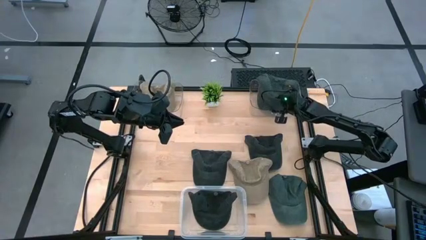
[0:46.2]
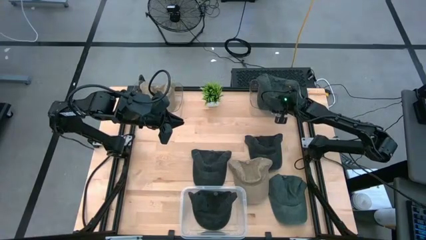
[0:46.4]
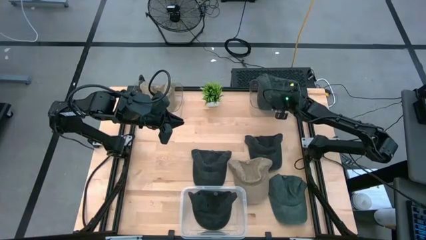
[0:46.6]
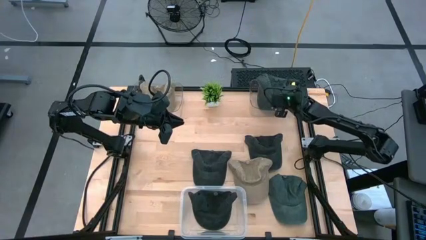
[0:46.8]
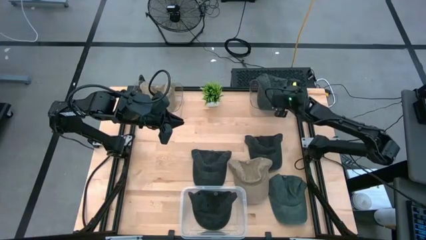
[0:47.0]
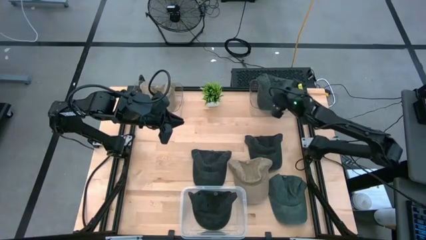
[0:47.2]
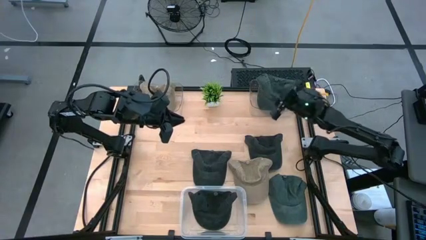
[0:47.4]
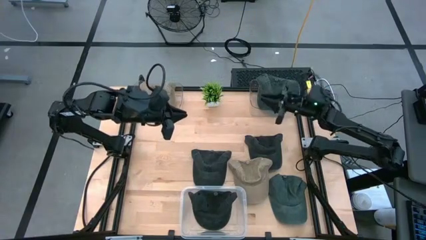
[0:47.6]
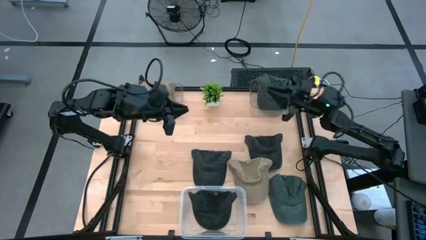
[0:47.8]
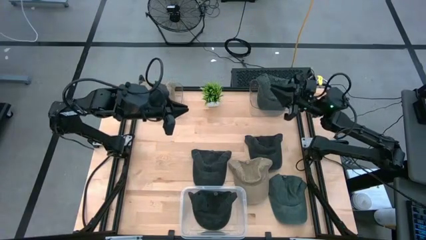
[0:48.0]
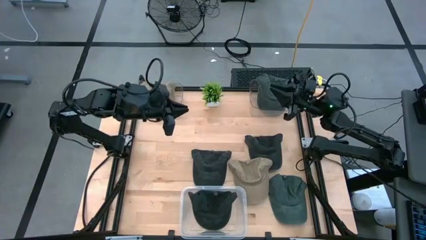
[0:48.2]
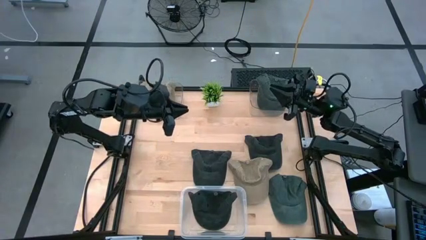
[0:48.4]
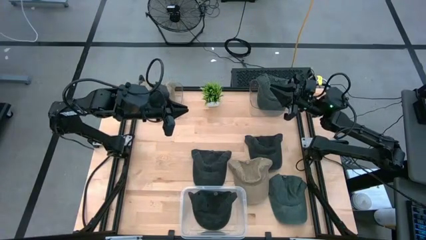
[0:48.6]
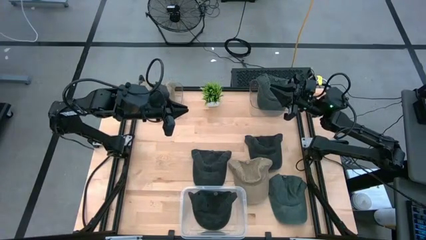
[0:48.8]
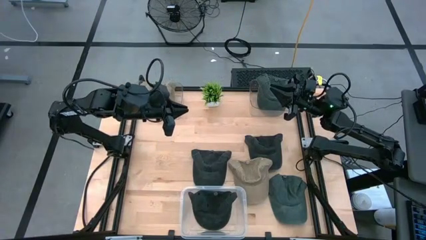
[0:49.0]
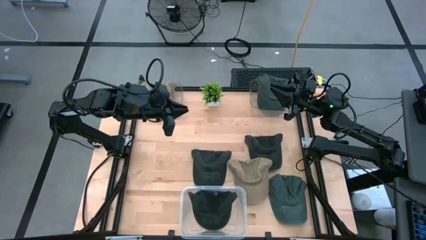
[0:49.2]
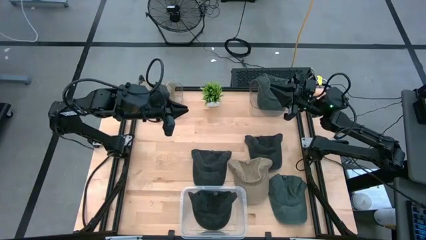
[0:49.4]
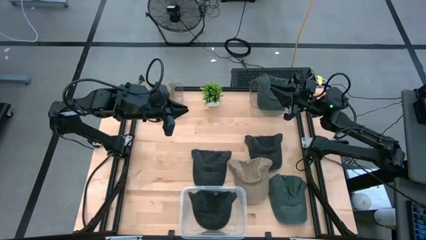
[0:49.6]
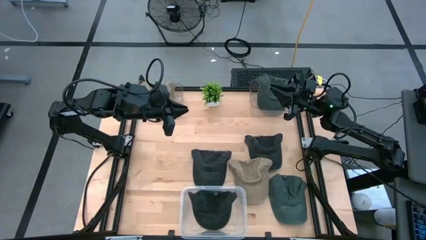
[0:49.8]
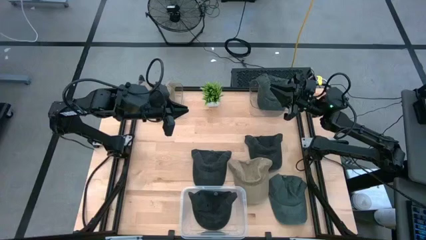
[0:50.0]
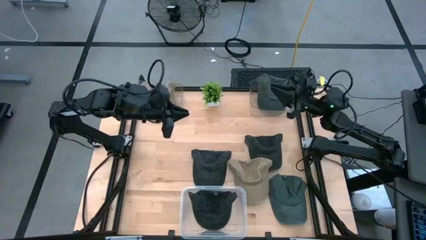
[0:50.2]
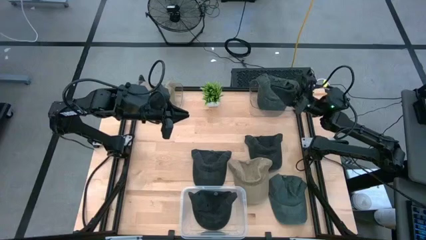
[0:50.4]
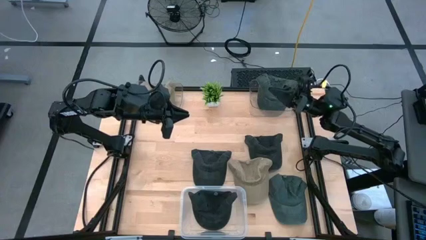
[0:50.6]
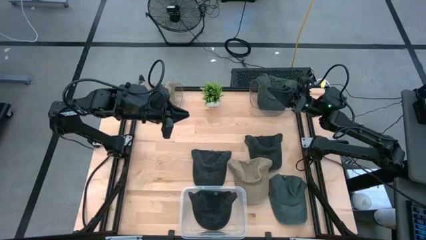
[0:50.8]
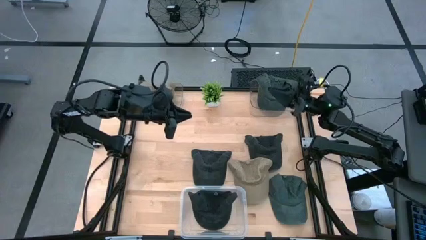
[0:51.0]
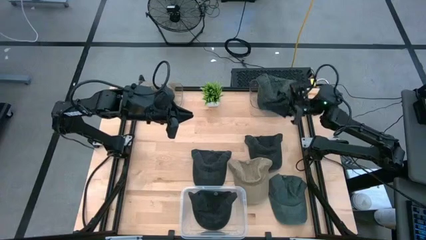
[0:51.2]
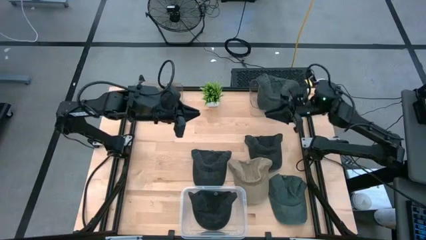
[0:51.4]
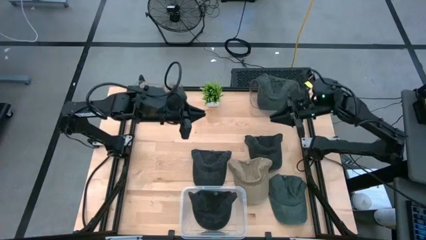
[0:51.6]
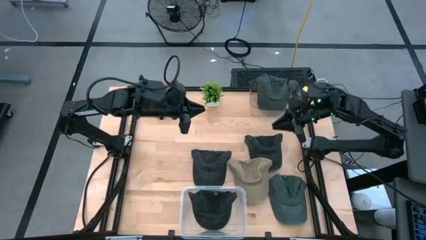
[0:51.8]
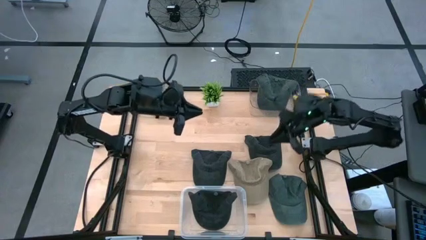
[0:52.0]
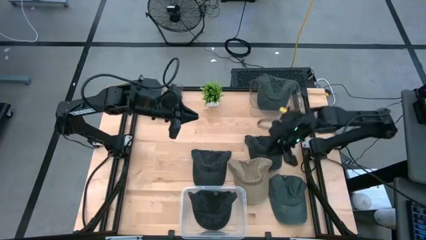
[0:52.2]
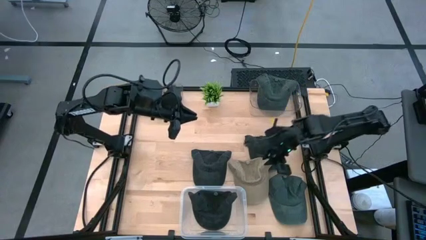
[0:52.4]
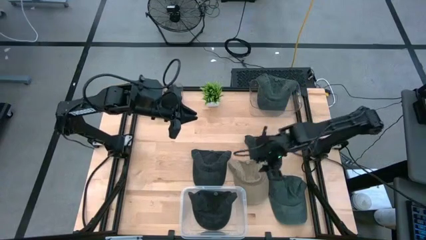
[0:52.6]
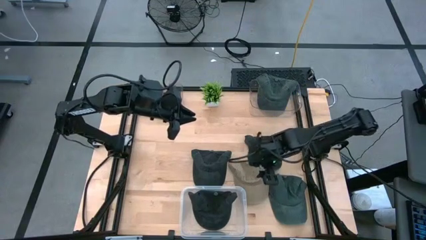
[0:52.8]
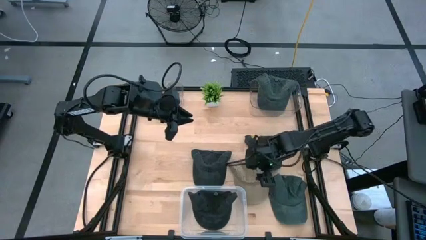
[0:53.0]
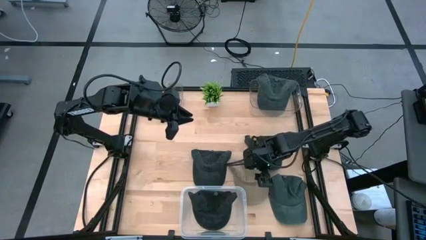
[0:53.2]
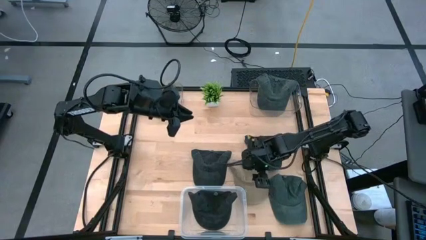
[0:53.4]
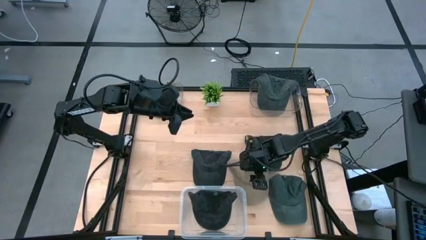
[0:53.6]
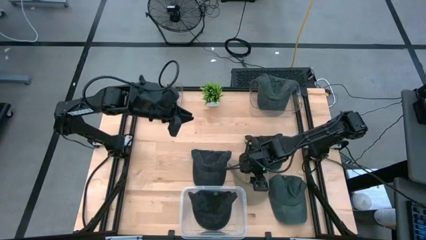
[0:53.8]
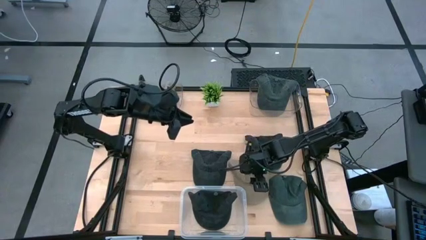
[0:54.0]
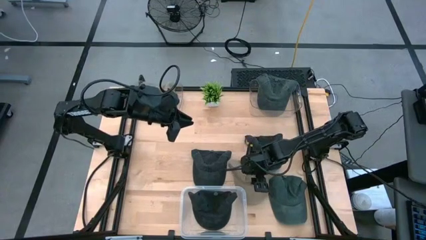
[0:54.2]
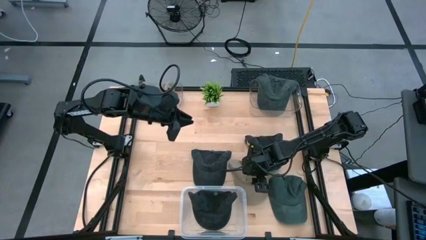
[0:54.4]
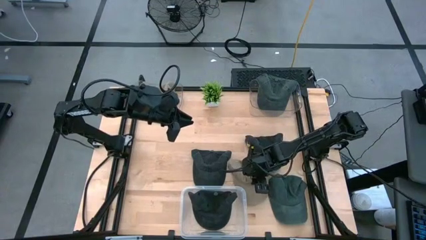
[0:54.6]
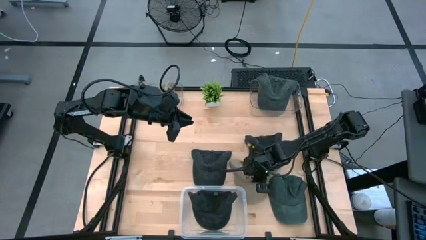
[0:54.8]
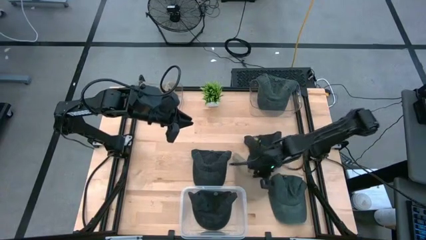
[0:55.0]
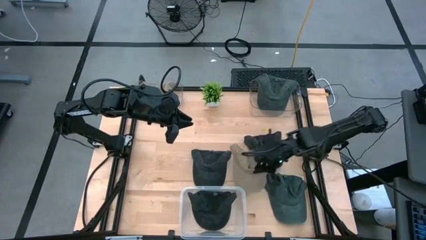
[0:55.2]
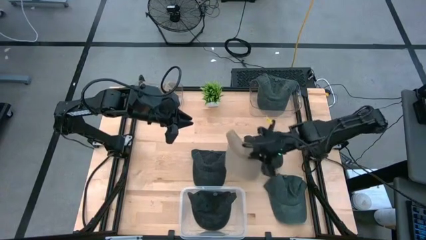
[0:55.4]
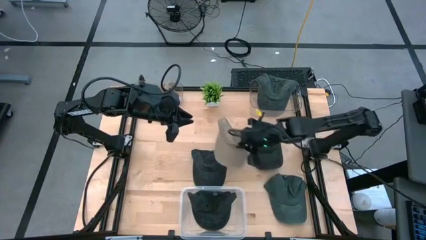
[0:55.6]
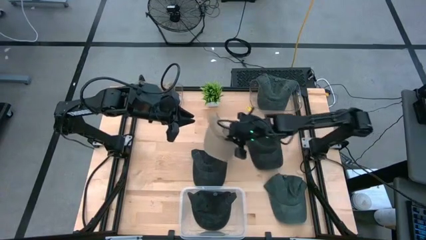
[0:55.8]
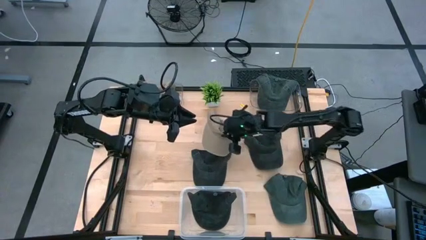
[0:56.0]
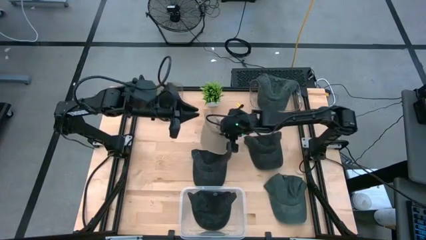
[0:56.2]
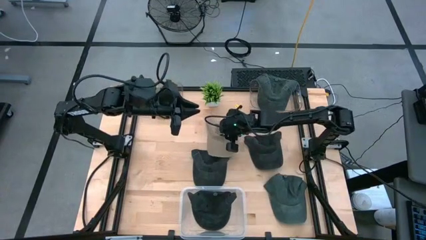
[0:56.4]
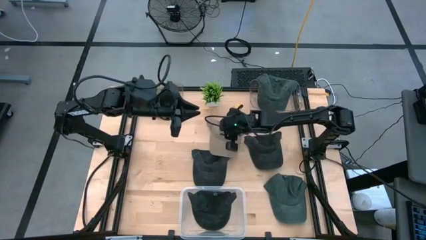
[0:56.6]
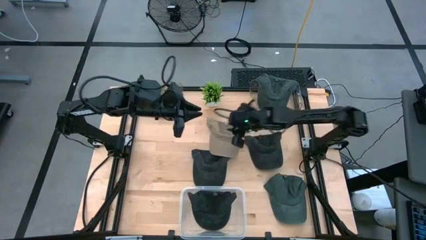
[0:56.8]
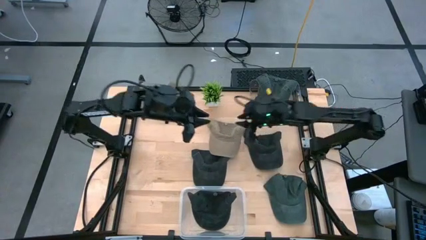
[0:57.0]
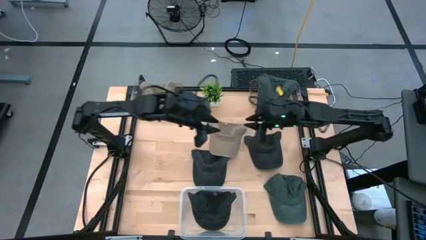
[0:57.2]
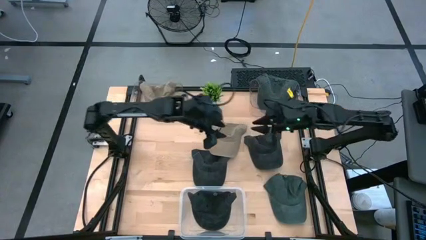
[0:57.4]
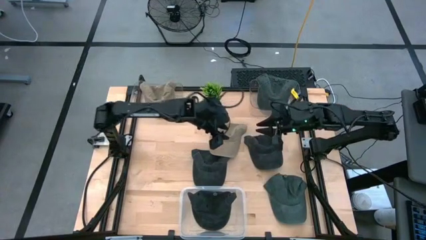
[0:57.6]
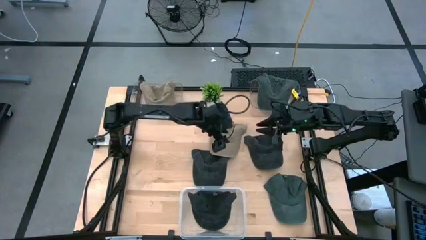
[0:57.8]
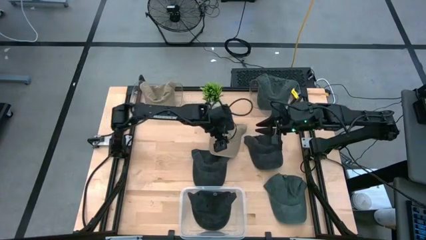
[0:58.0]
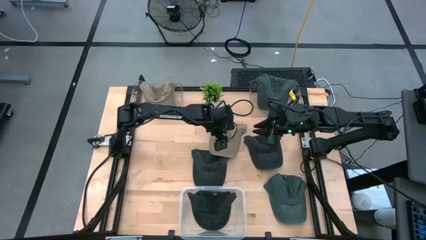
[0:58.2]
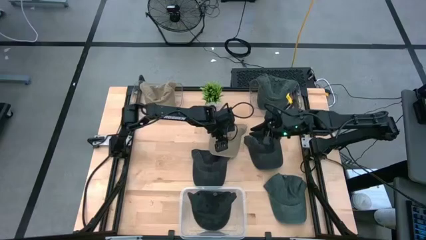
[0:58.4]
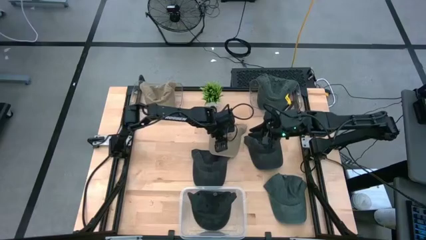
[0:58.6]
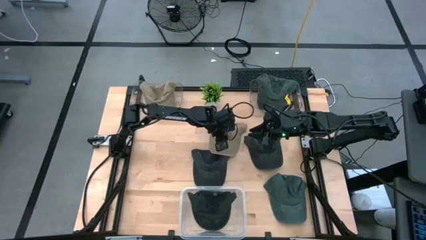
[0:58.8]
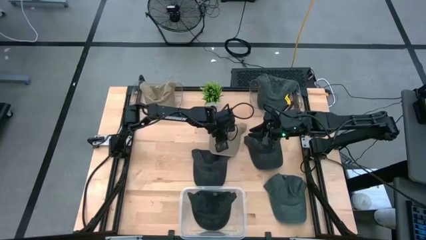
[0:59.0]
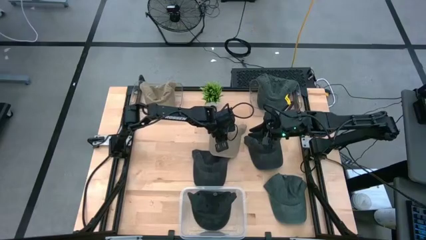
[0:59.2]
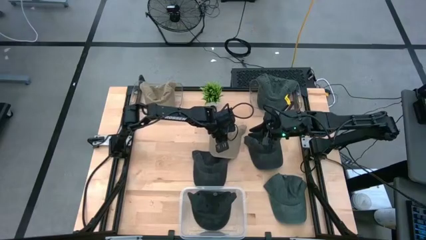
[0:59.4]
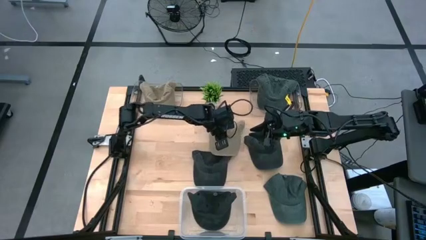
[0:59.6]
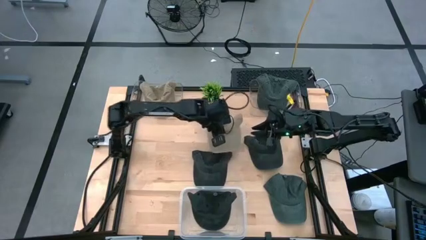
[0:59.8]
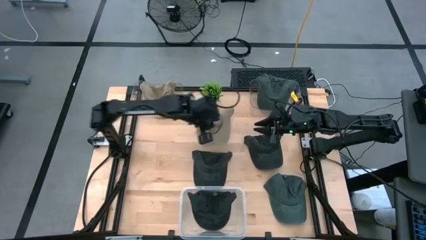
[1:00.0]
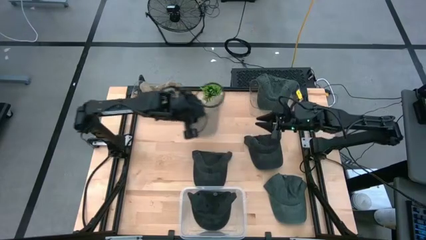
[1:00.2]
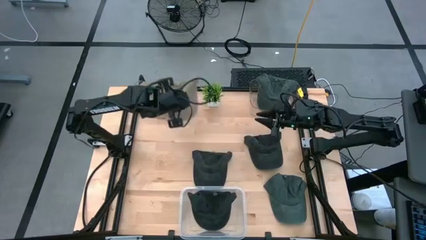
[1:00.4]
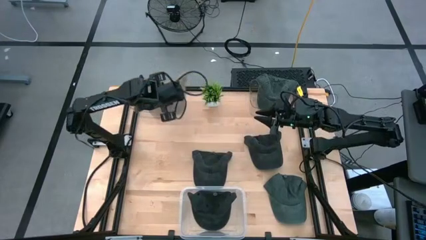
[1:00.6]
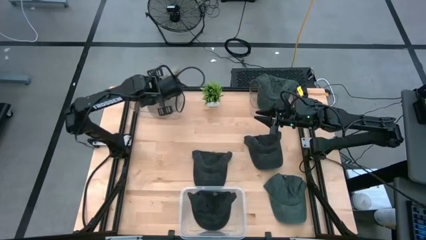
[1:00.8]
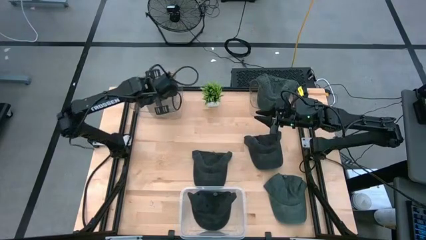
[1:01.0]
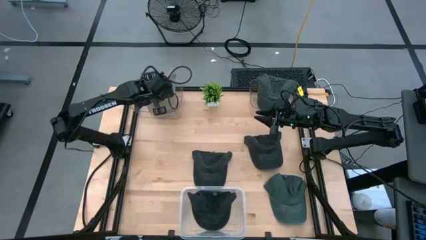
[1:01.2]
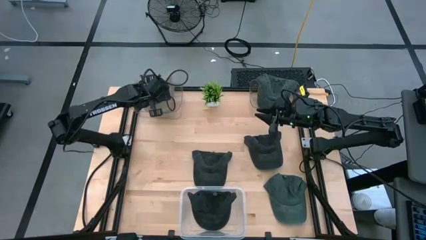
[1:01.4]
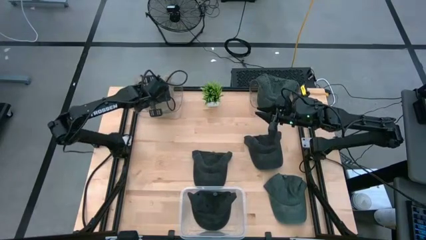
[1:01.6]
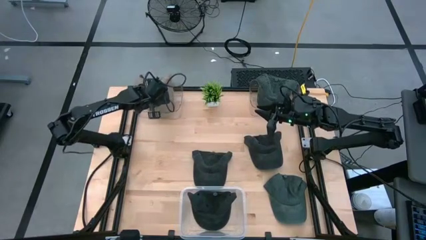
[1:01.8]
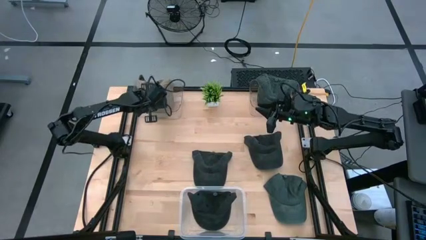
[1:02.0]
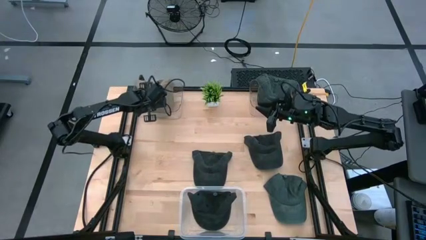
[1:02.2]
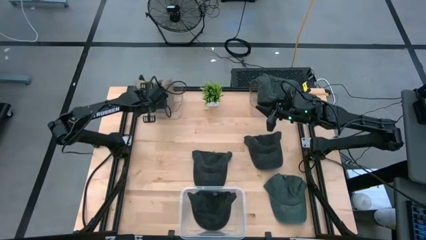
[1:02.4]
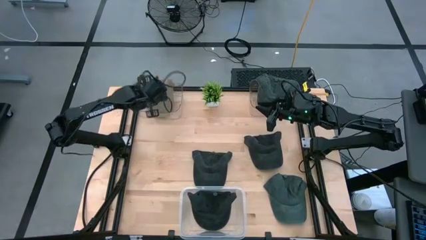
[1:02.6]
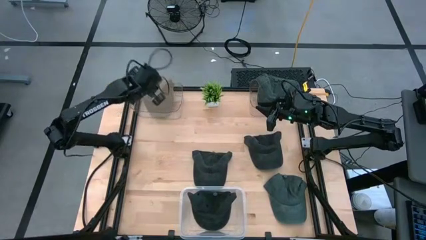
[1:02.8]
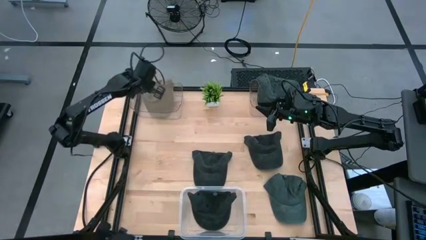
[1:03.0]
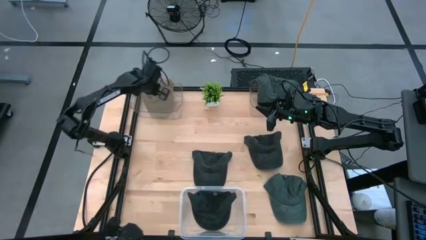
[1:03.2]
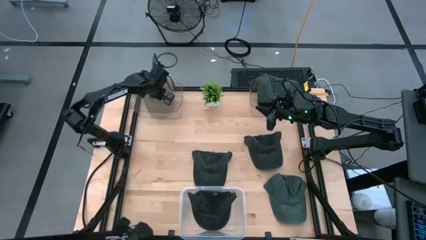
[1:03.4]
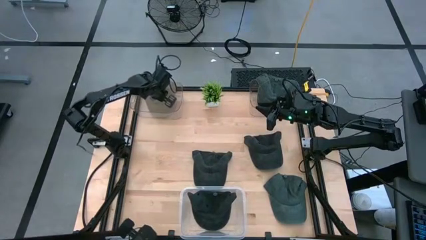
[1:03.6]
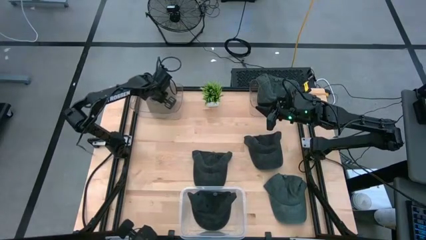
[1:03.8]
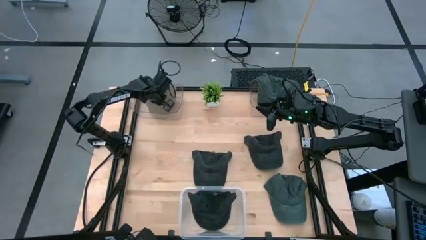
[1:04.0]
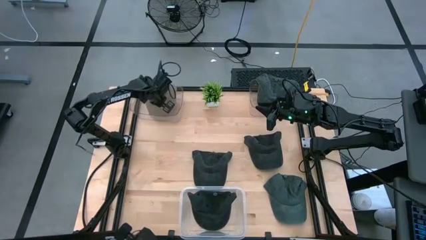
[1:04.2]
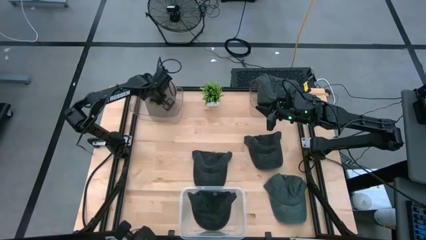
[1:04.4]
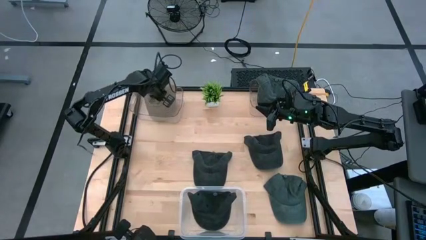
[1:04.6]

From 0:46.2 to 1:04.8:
Task: Pick & Place hat
Put the light brown cap into the left transparent bin
